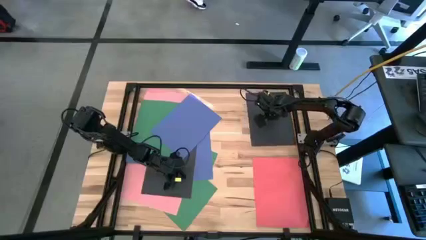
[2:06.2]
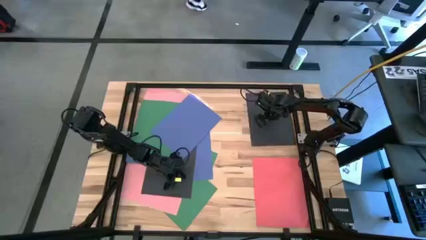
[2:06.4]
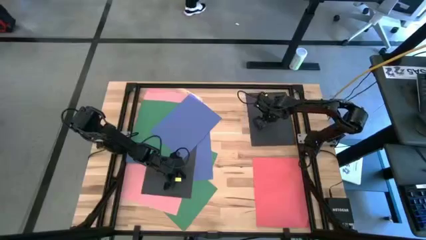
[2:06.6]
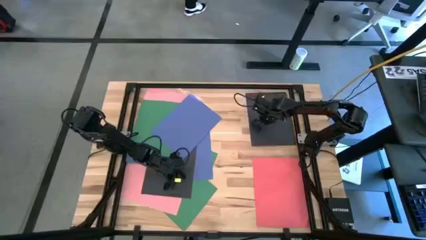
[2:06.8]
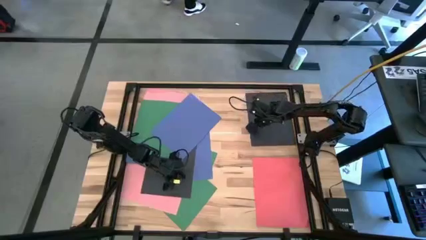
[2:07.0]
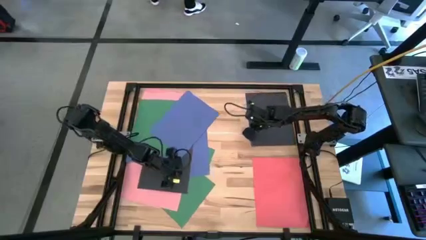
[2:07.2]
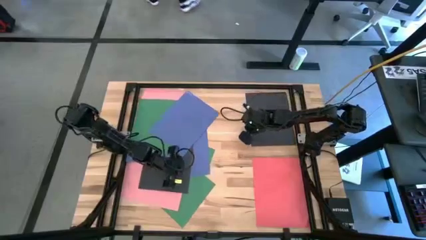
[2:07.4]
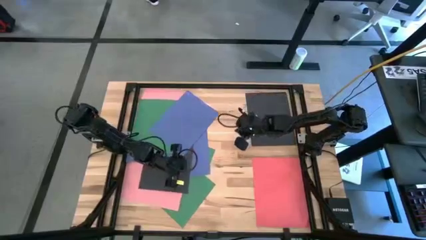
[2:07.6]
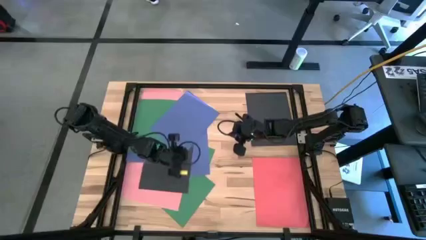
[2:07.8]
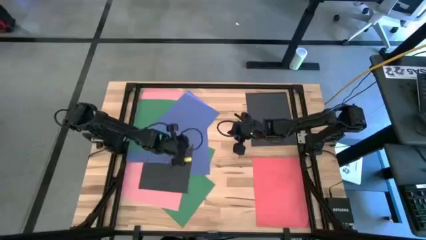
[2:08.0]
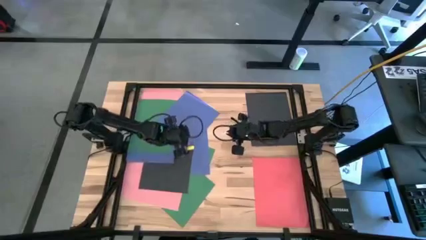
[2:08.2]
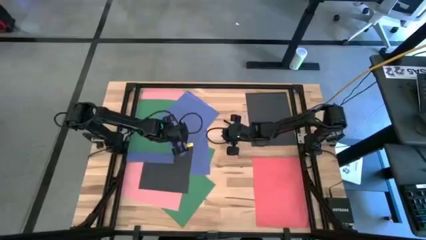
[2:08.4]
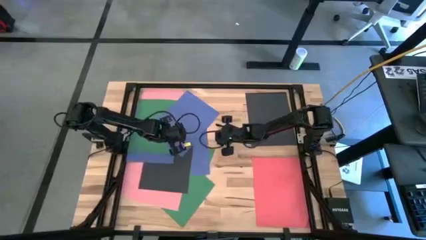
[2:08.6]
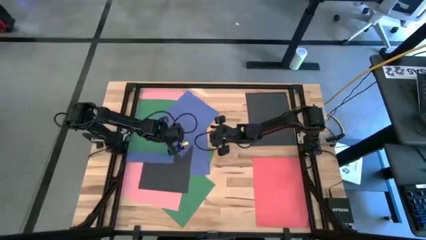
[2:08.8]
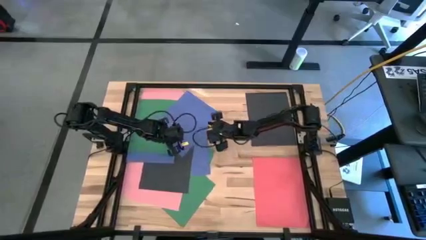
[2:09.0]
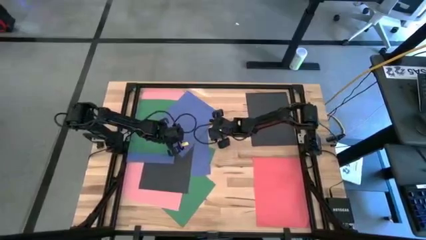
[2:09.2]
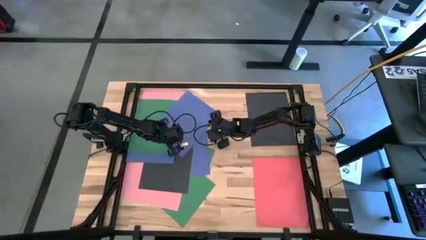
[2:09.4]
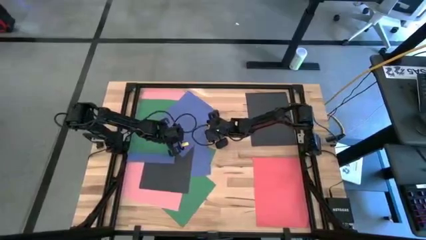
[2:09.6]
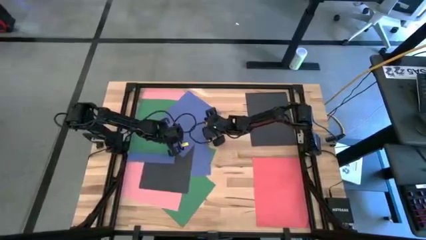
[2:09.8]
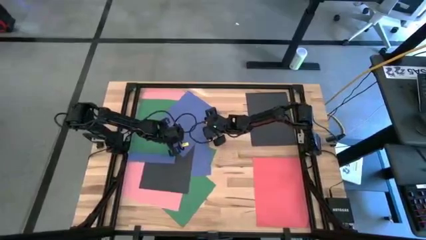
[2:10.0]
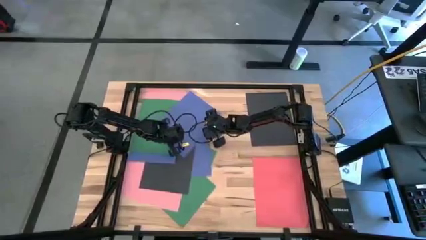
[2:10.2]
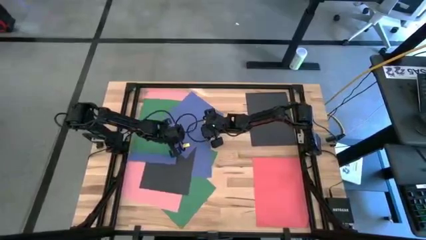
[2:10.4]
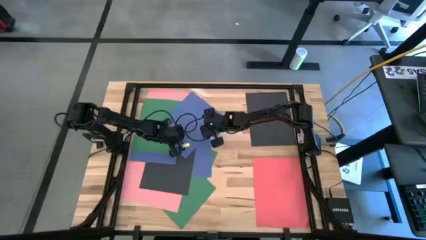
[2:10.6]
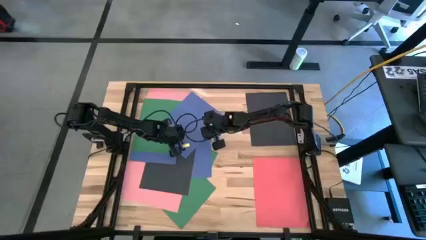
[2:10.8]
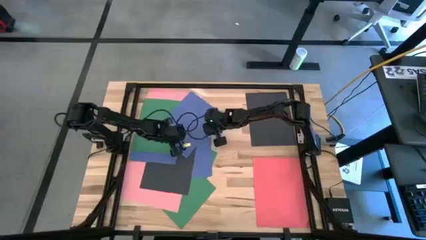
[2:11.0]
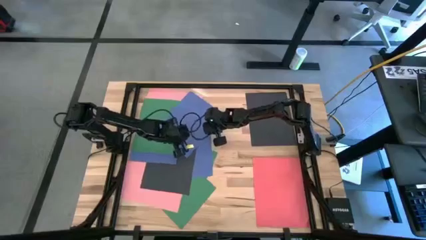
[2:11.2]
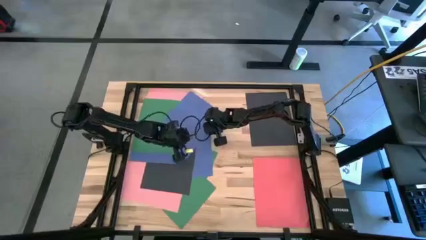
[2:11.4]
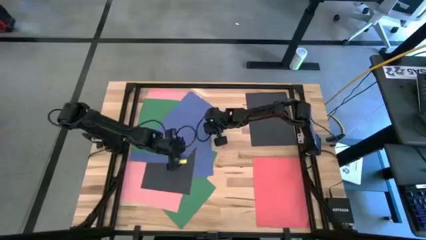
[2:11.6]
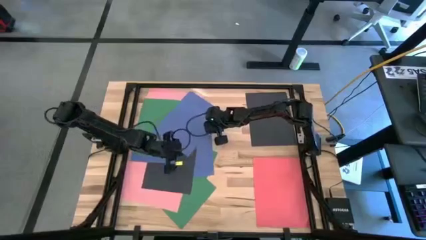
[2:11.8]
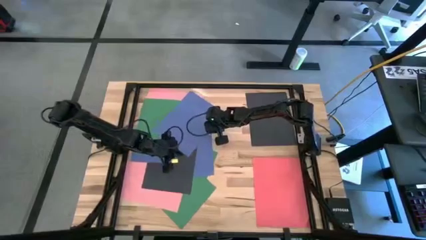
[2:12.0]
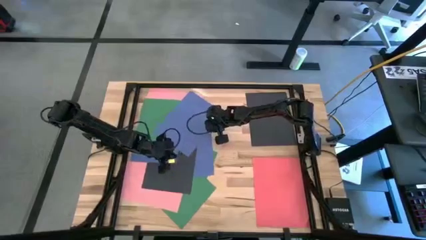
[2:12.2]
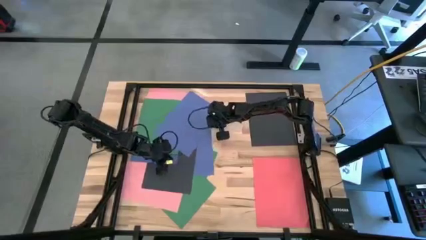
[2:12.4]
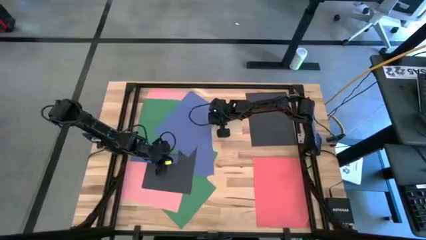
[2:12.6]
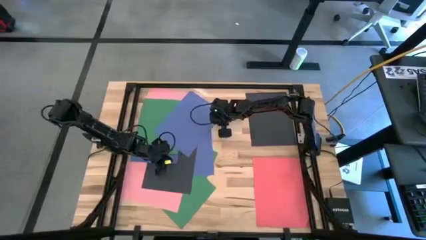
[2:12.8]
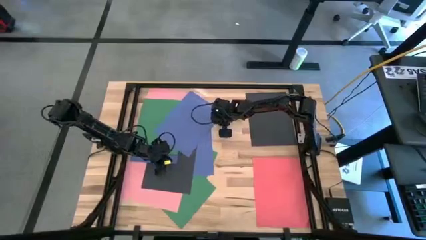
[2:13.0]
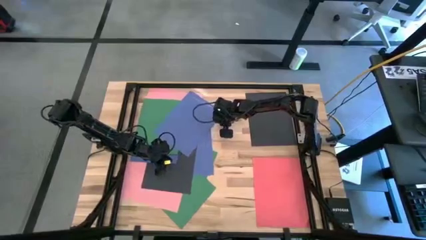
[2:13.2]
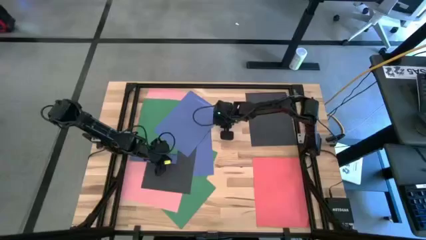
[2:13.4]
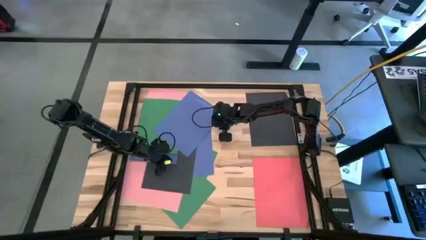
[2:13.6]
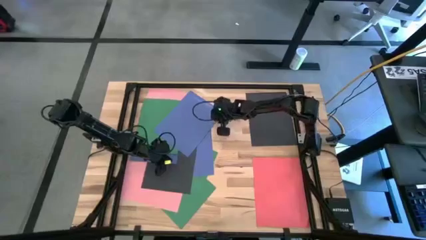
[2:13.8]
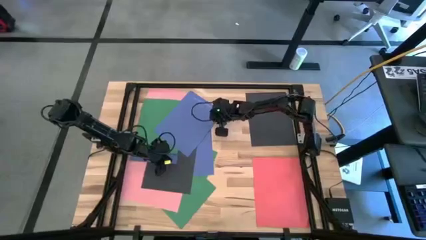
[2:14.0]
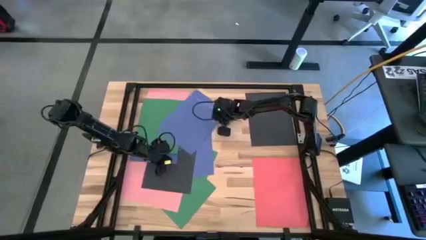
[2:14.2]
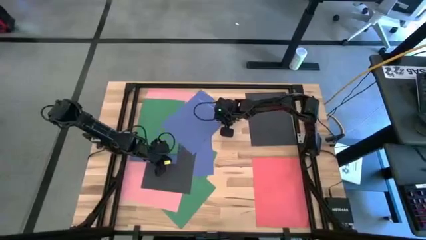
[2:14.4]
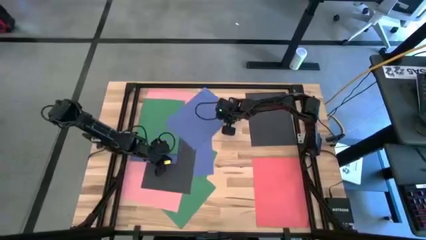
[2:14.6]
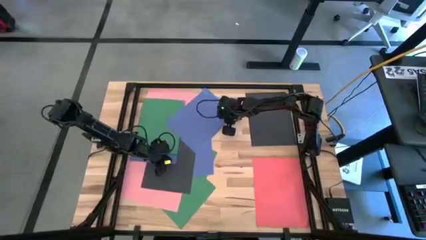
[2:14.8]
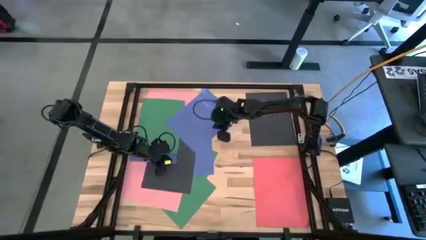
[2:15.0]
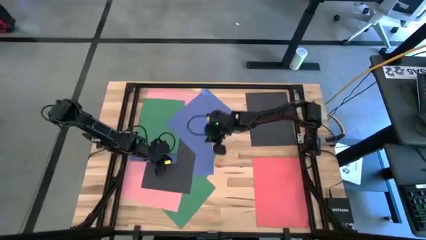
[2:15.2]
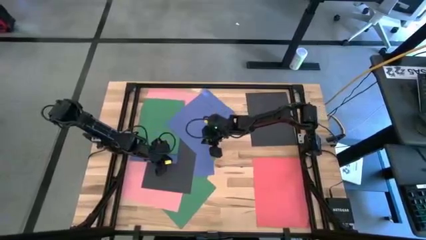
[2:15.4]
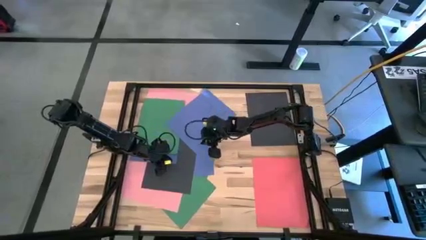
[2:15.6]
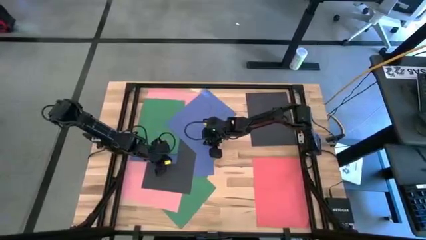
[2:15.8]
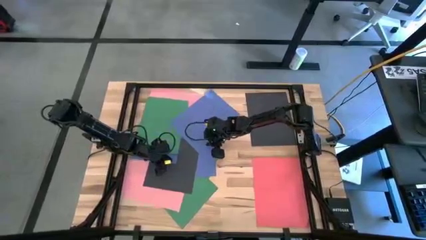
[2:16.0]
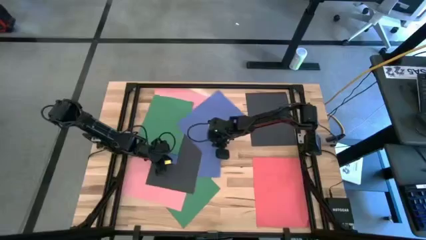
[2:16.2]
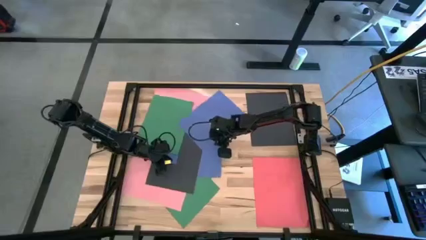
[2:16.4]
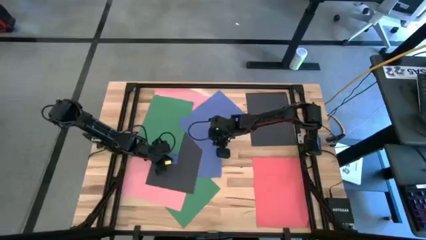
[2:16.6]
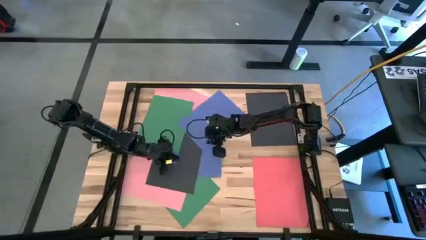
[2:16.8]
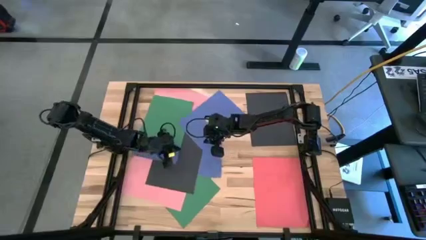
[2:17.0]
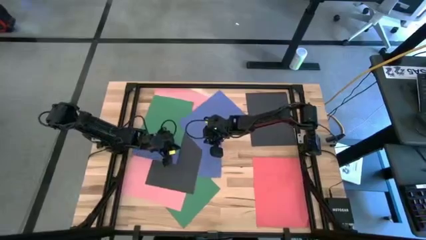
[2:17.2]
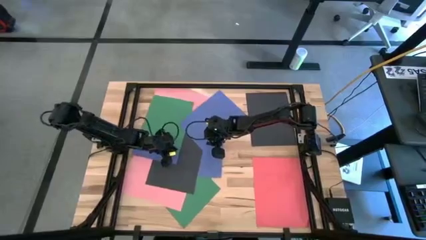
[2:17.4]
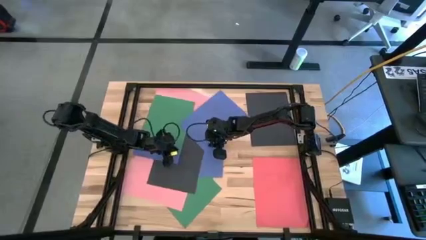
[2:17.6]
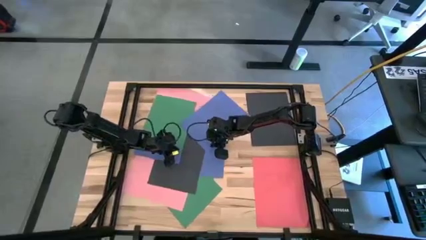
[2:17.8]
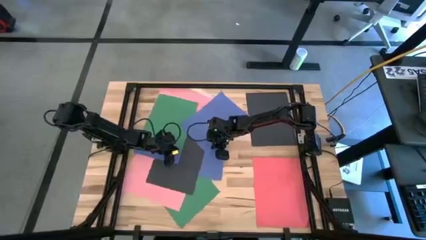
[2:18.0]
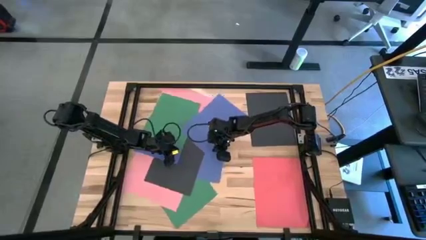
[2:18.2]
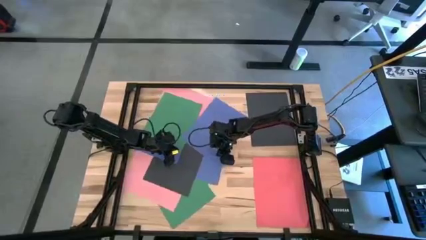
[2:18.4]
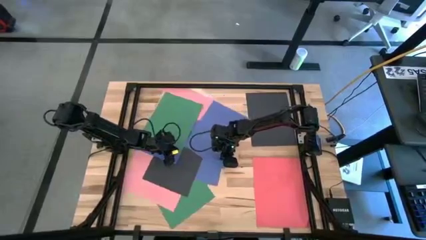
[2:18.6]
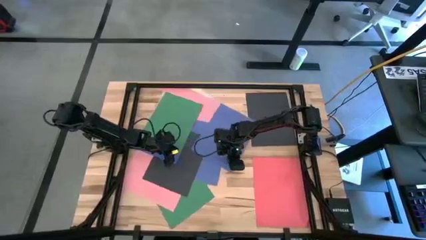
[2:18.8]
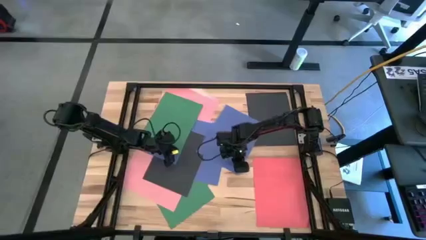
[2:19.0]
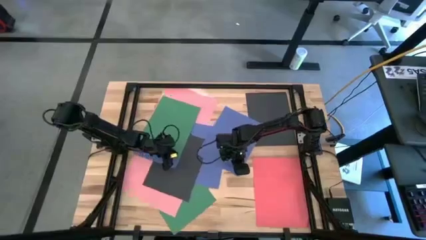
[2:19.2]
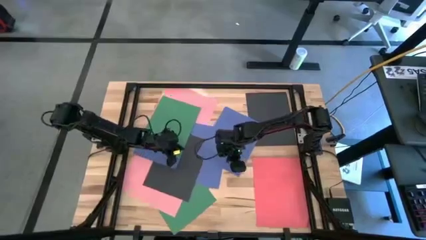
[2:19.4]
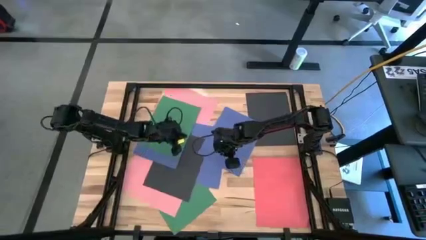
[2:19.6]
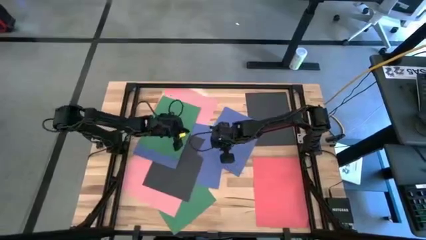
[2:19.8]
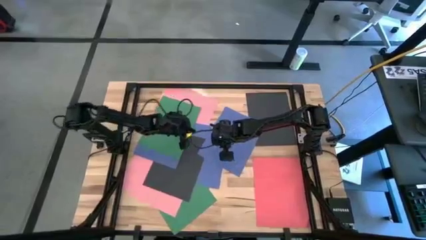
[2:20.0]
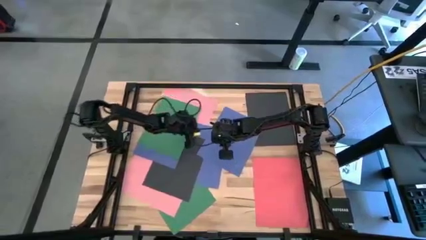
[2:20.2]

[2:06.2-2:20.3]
Task: Organize paper
Move the blue paper to the top center of the table

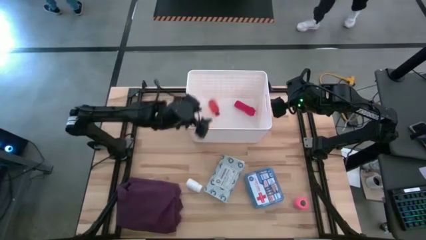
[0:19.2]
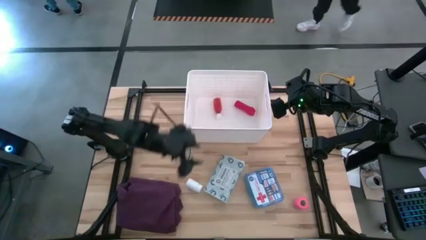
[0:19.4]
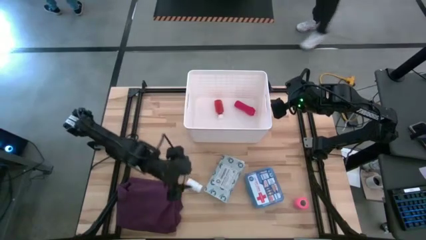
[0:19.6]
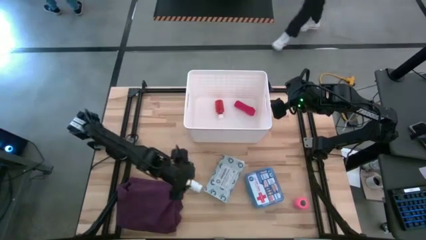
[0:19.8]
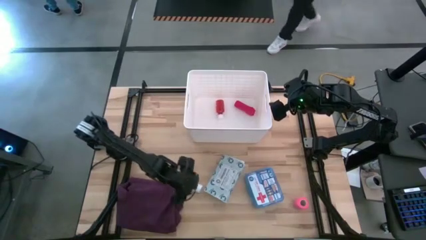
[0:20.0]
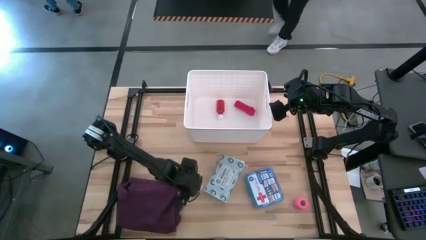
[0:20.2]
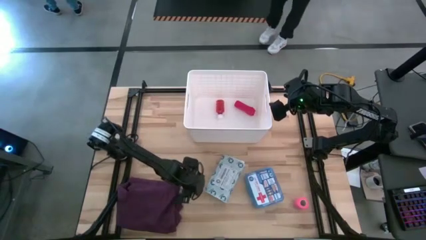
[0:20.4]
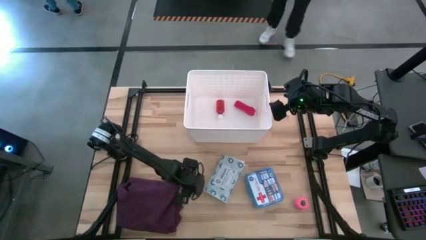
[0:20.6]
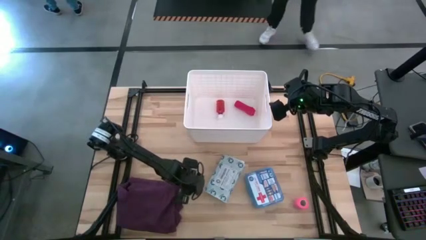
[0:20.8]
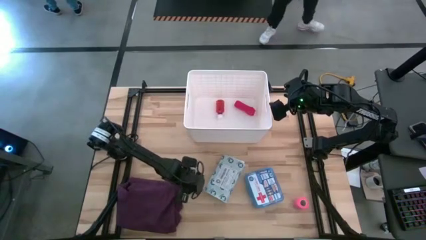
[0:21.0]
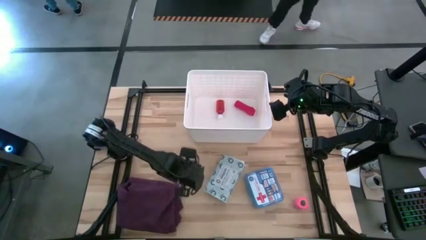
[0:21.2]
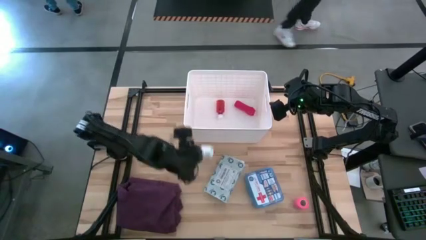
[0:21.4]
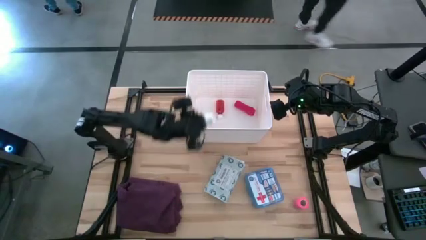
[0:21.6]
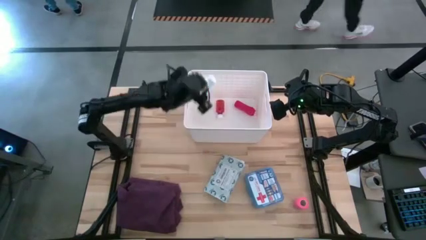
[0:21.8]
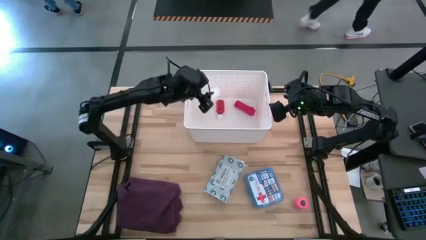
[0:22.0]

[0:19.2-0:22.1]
Task: Pick & place medical supplies in basket/bin
Put the white pill bottle into the white bin
